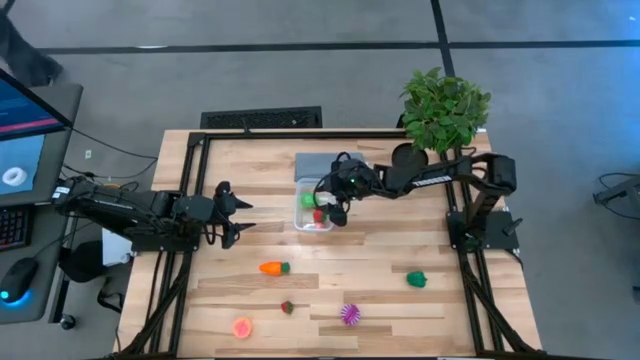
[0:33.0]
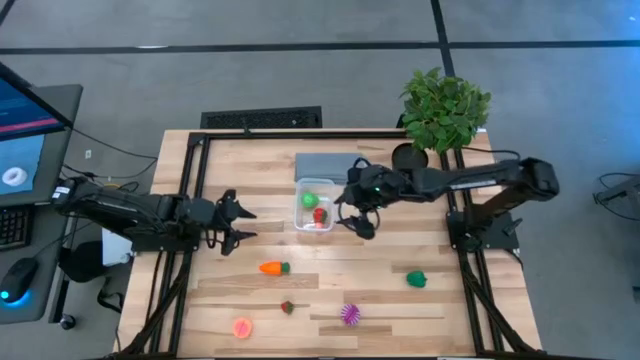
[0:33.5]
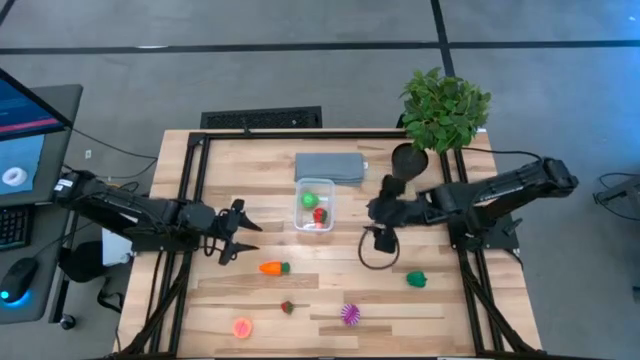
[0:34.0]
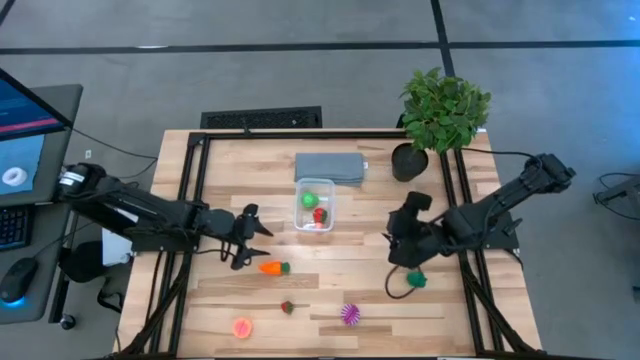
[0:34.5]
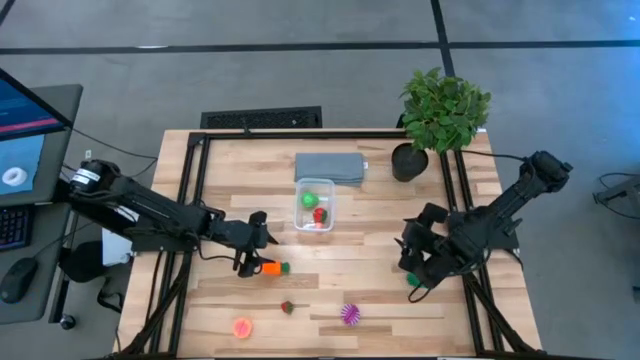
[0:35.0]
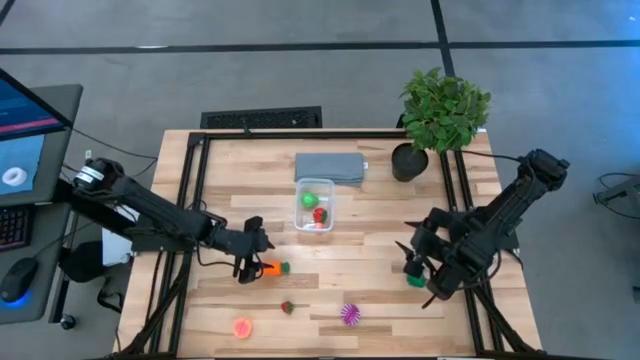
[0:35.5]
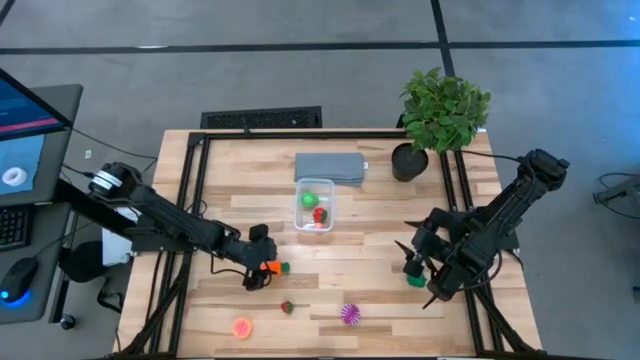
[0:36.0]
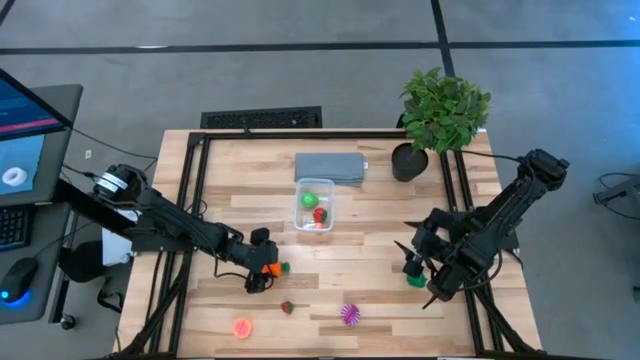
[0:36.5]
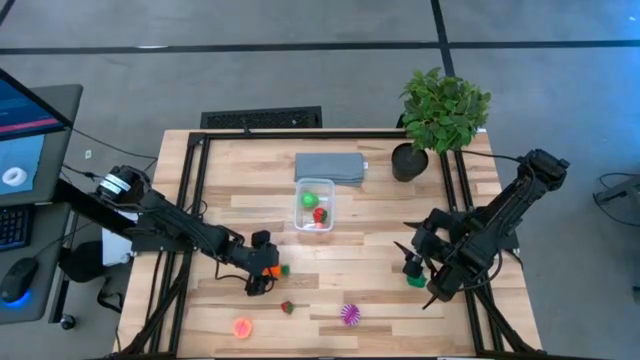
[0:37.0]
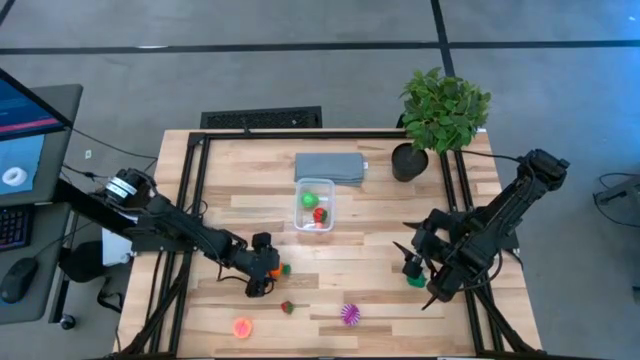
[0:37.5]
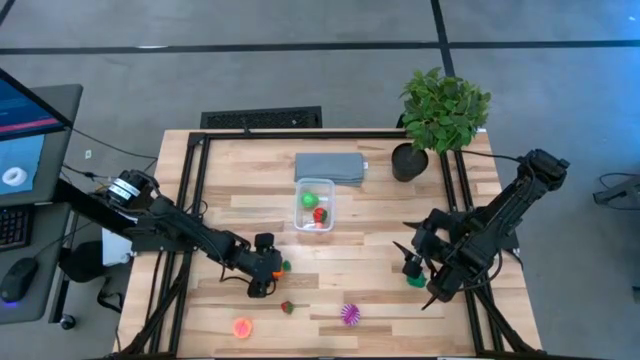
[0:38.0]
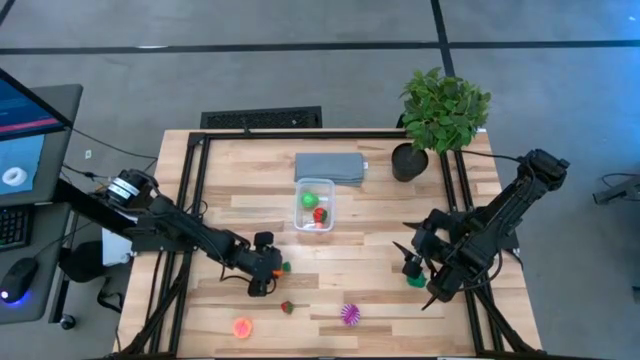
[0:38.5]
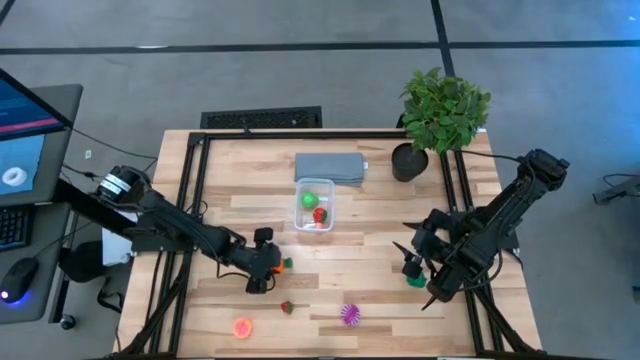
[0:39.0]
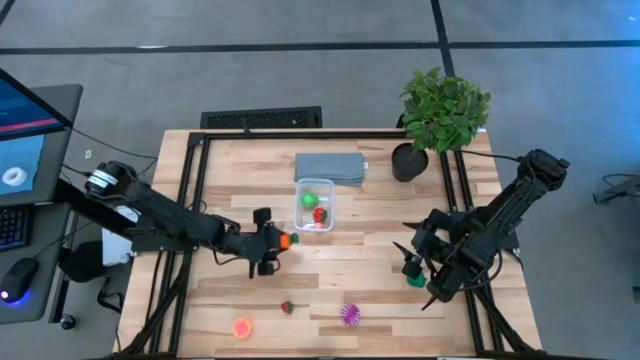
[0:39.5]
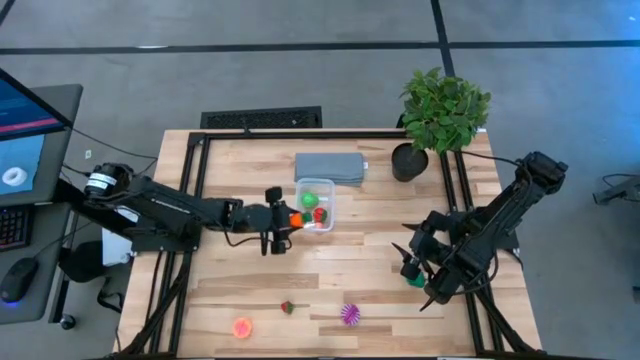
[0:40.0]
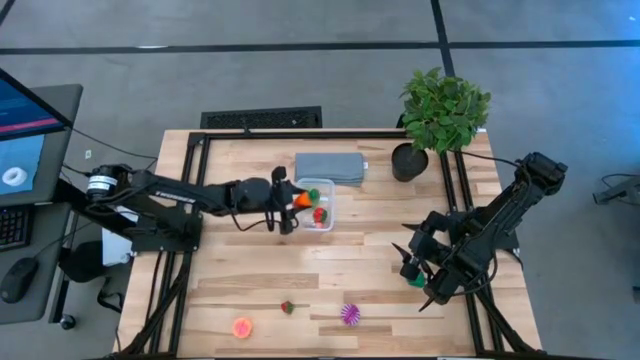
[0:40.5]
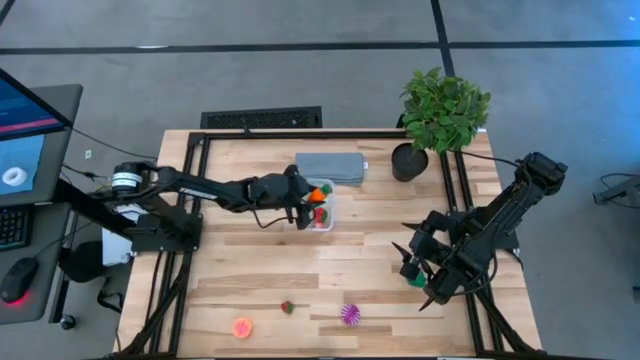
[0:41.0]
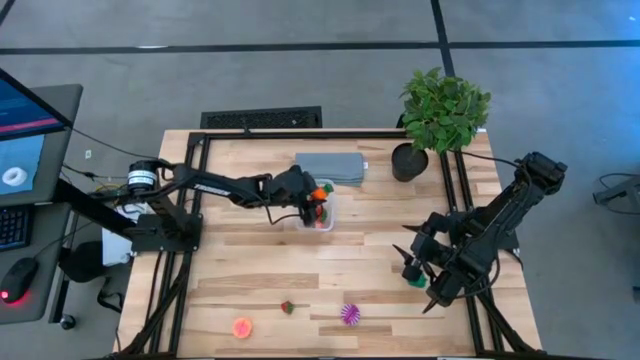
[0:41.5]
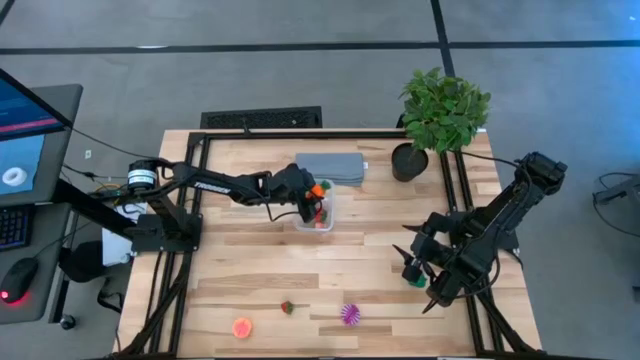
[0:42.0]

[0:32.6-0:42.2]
Task: Pick and placing Produce into tupperware
Put the orange carrot into the transparent bin

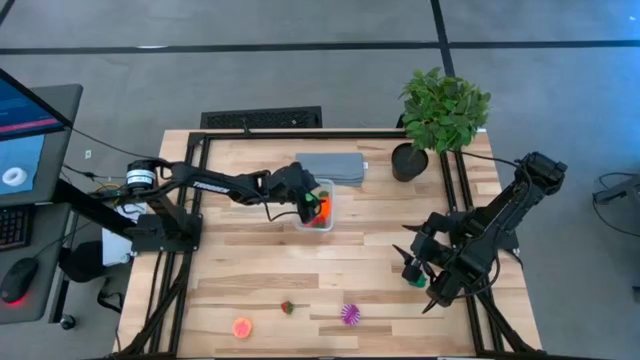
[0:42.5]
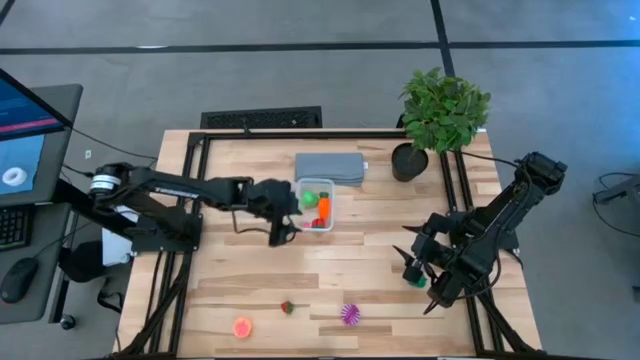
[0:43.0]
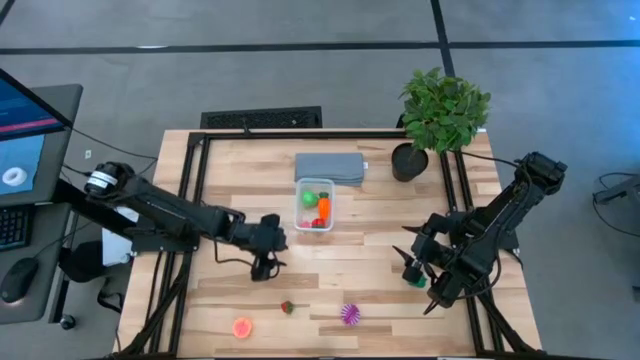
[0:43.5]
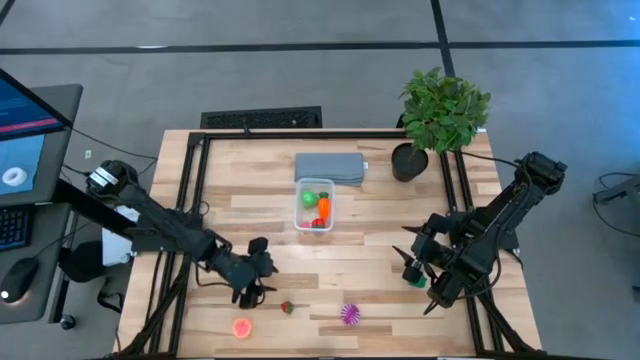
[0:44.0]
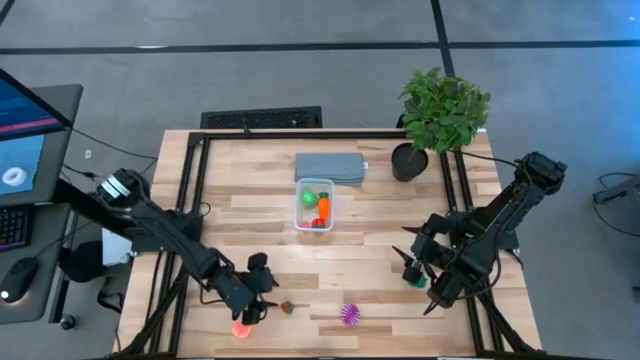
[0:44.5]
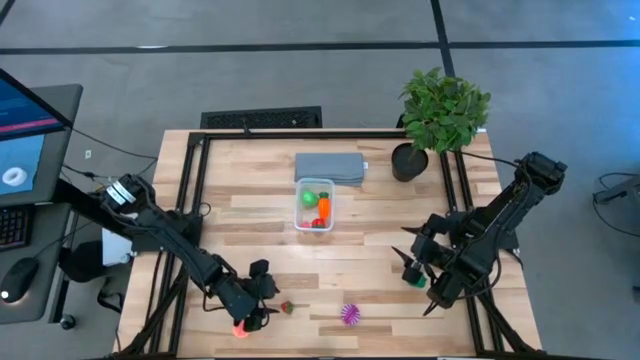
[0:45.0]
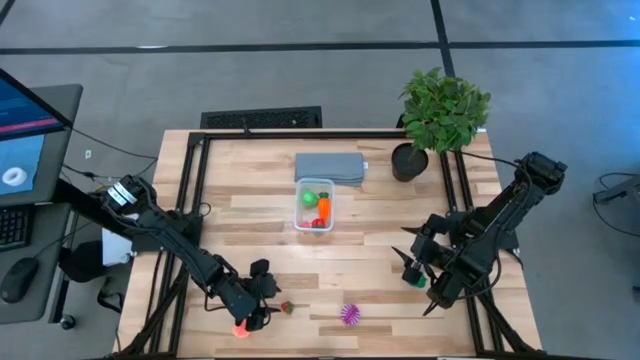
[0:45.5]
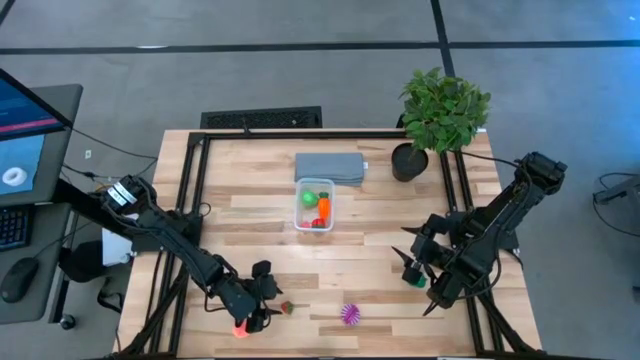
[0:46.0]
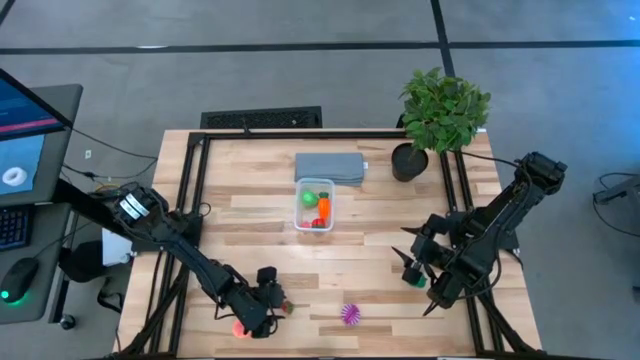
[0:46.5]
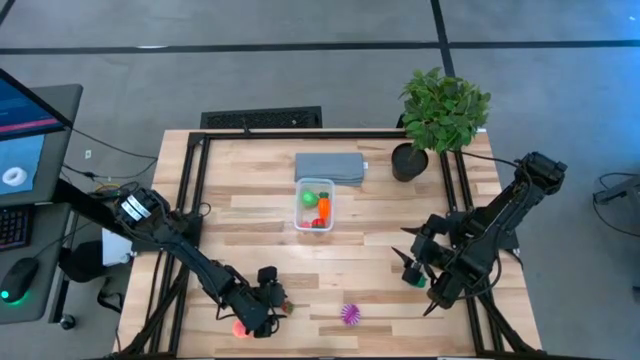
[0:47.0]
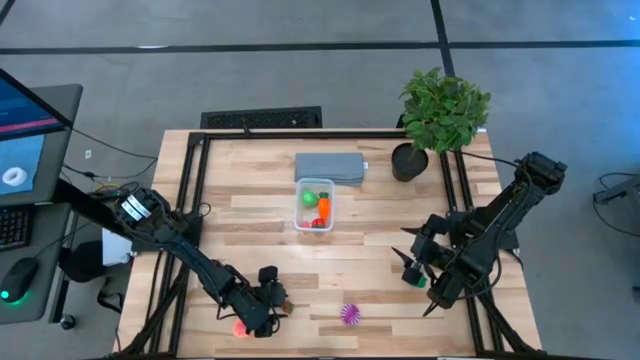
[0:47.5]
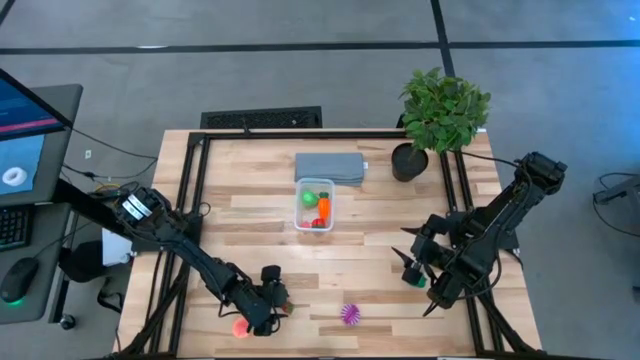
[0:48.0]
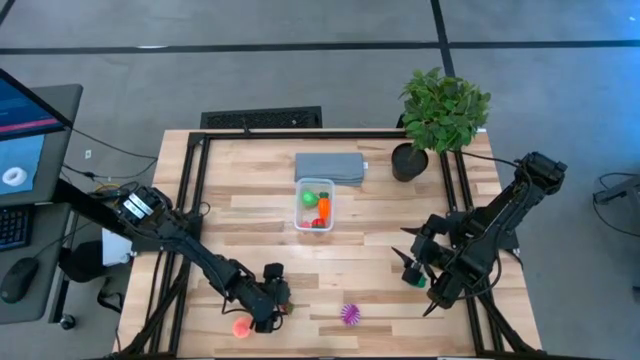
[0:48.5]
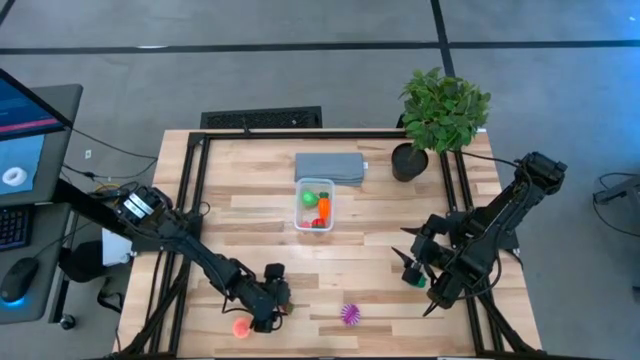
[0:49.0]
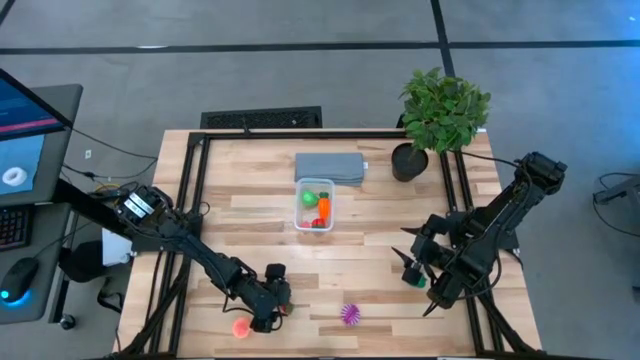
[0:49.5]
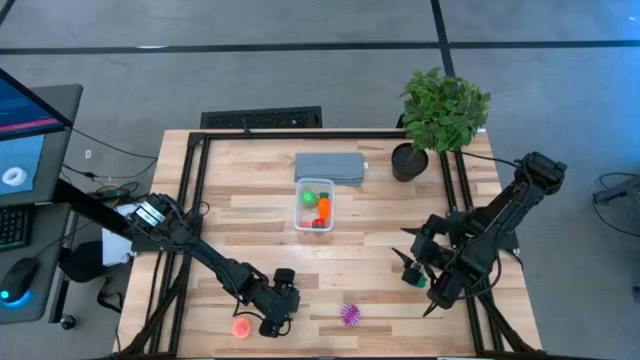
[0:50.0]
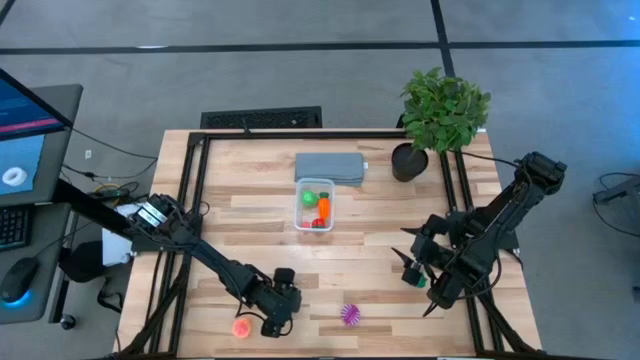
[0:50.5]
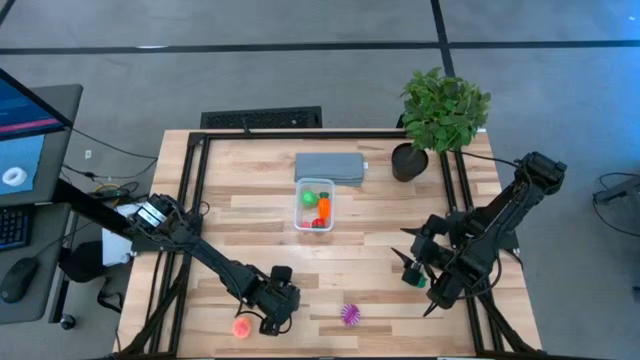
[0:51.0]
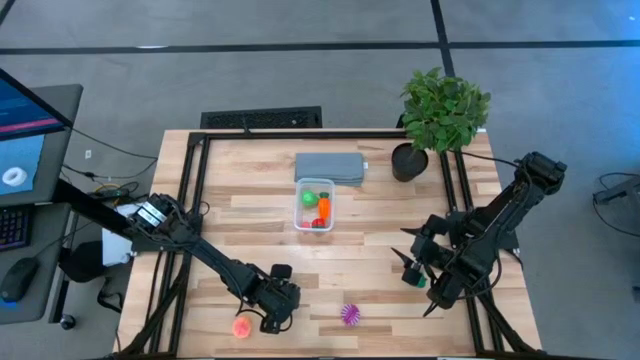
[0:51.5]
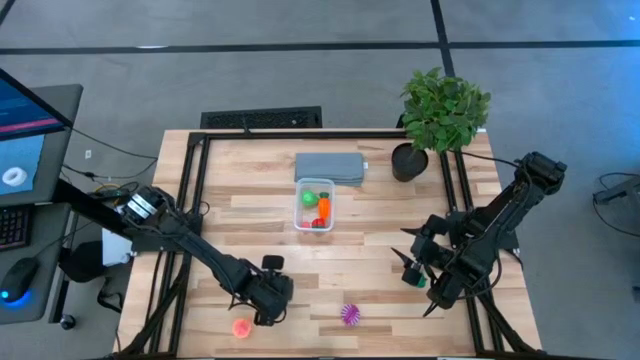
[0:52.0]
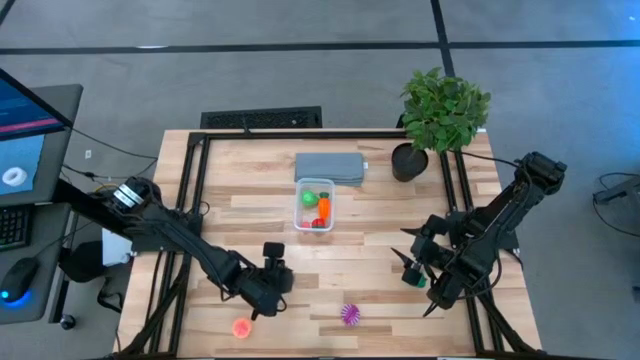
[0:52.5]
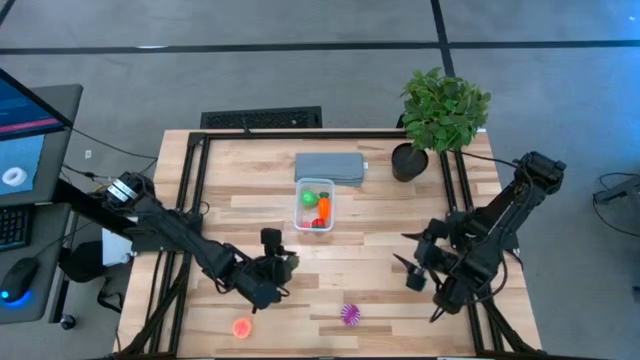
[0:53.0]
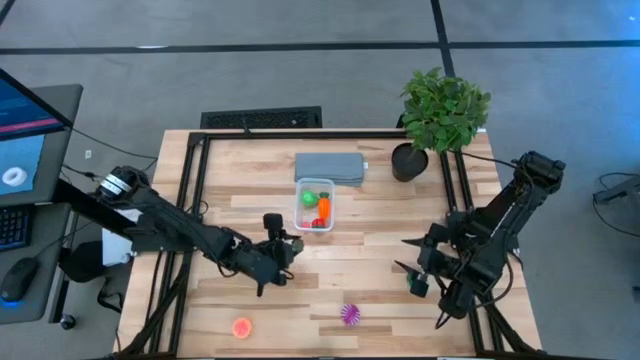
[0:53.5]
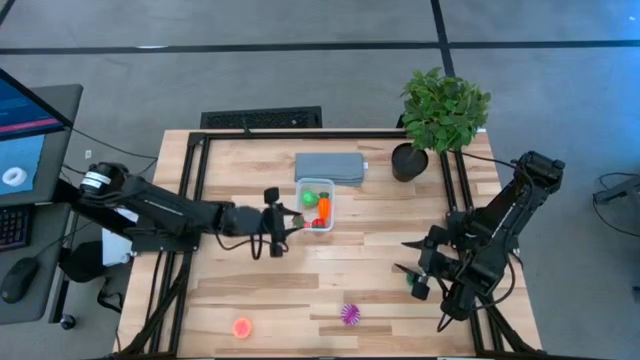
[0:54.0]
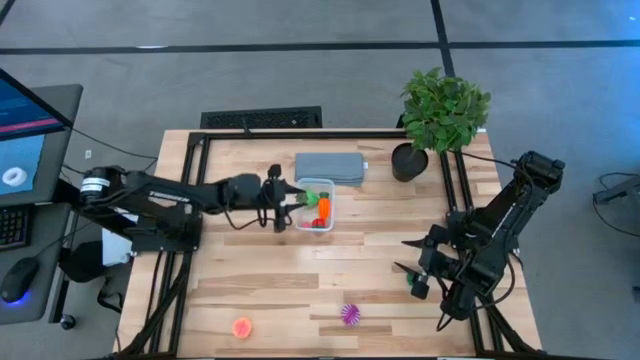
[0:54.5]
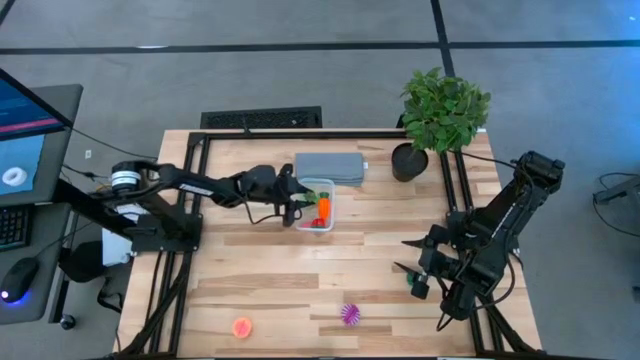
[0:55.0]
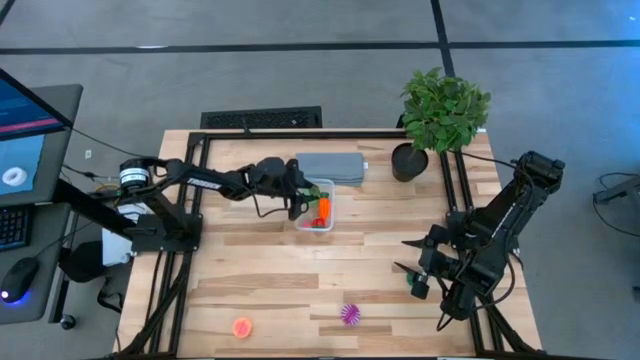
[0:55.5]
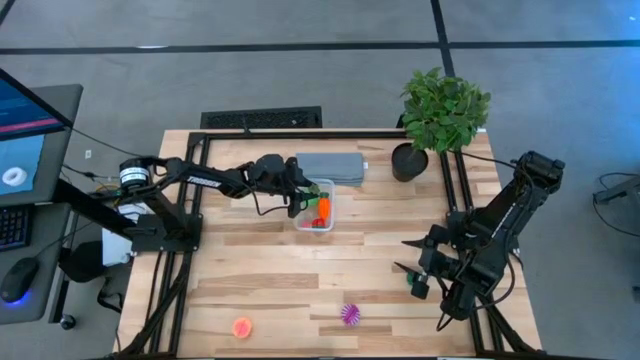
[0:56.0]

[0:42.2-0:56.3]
Put the red strawberry into the transparent bin
